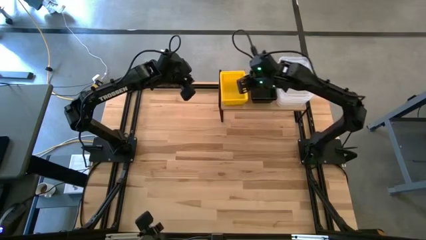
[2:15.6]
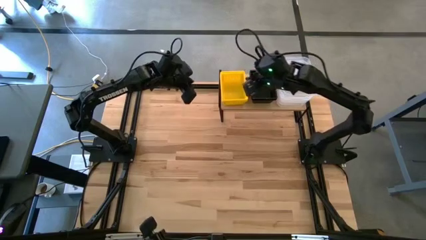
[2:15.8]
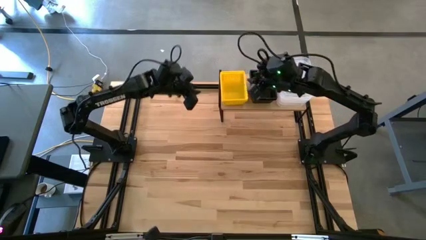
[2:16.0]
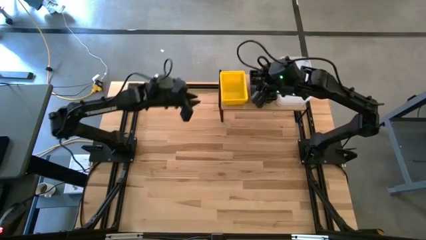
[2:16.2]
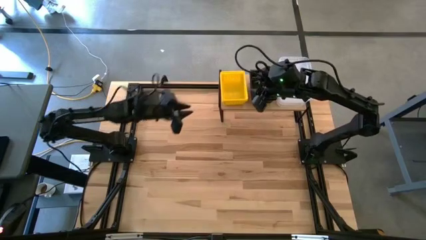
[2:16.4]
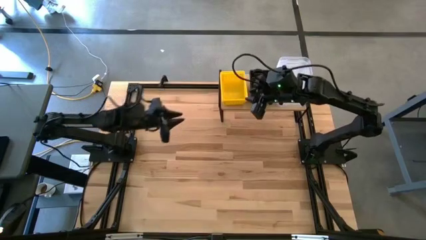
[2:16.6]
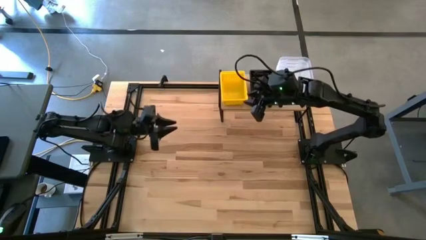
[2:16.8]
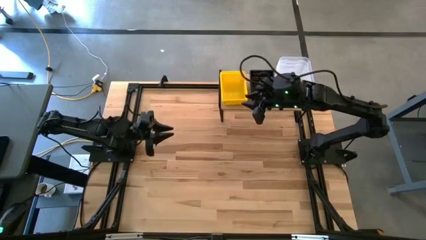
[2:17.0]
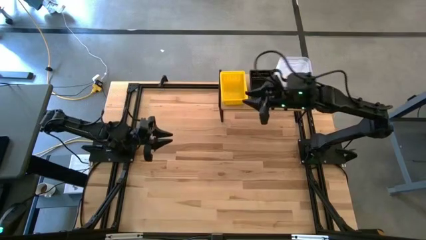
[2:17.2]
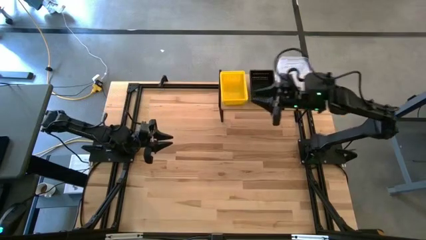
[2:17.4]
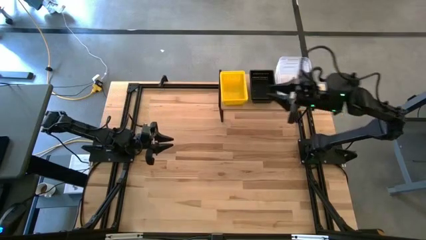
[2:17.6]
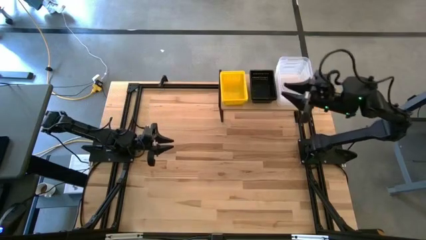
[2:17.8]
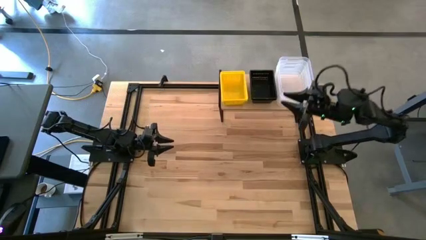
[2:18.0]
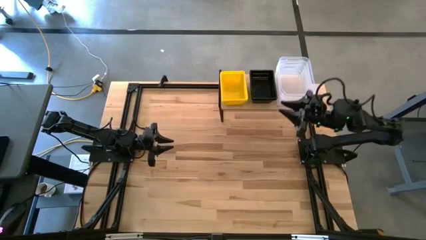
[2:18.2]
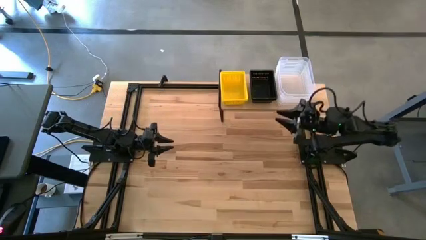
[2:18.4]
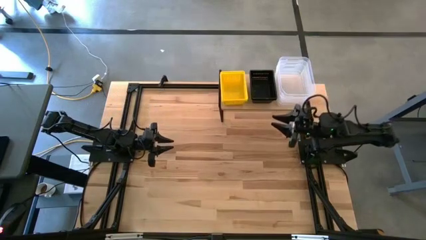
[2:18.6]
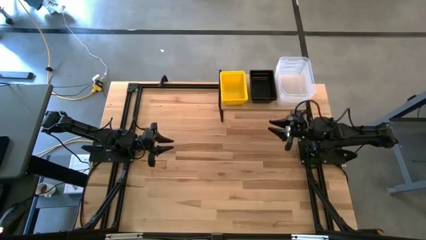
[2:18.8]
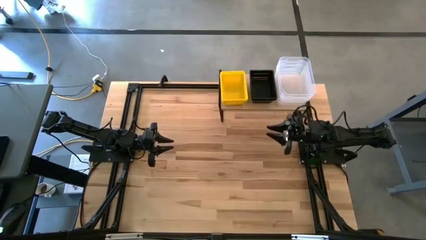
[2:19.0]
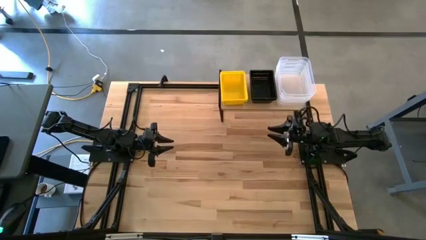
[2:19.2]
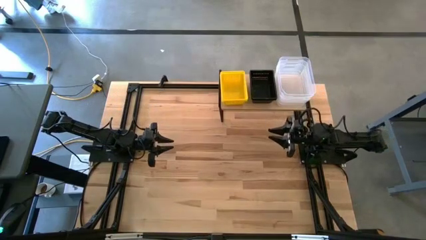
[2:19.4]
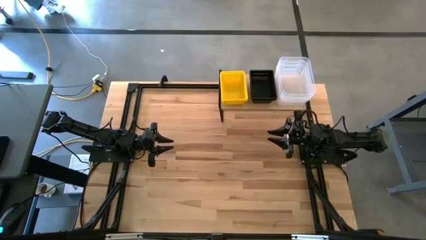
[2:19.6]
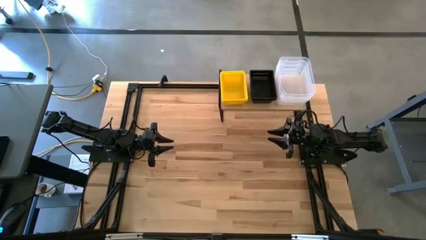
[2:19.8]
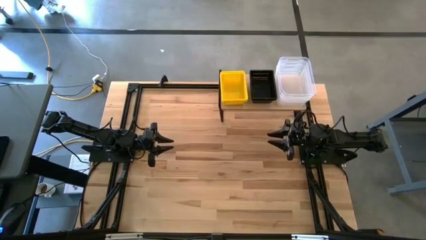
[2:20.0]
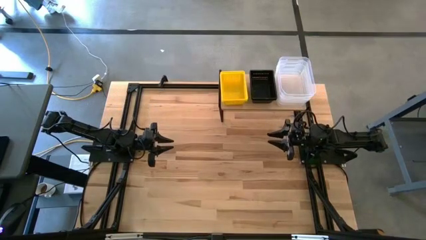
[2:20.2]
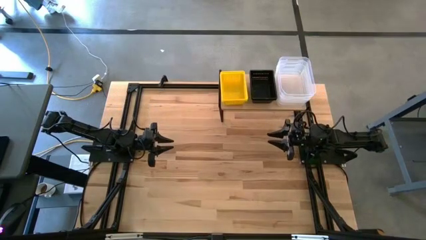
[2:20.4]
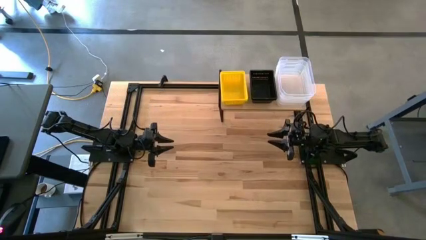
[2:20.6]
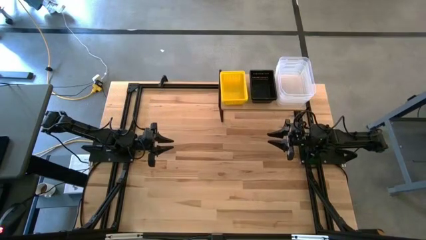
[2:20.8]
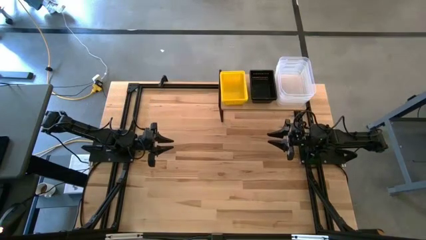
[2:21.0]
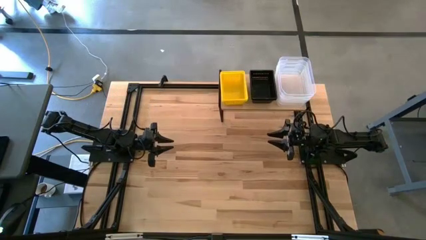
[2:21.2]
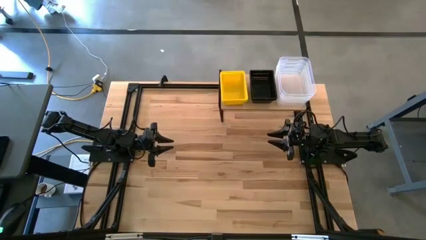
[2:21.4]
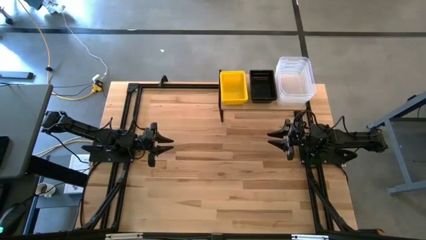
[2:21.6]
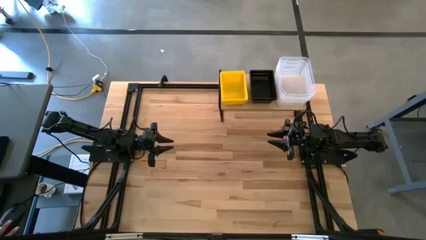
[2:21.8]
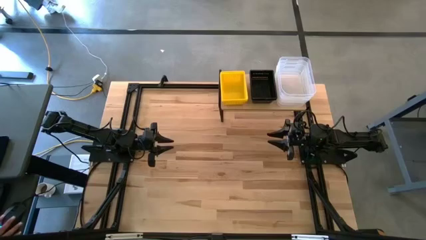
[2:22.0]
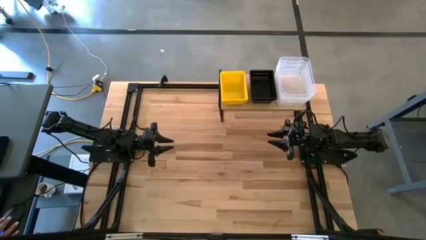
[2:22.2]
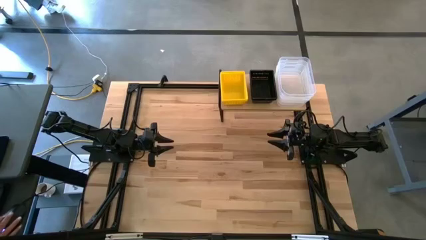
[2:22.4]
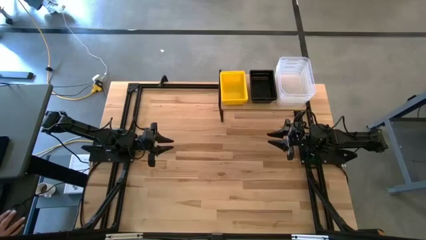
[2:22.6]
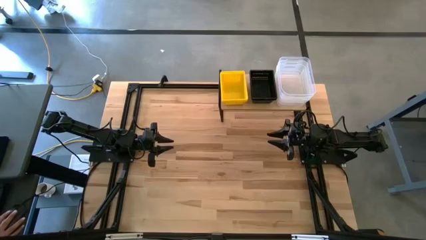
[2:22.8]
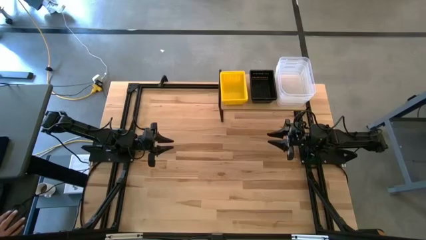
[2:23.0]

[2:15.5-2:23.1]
Task: Stack baskets on shelf by color
Return to Home Position
